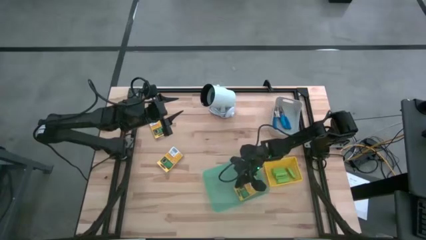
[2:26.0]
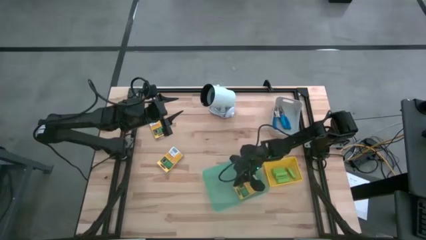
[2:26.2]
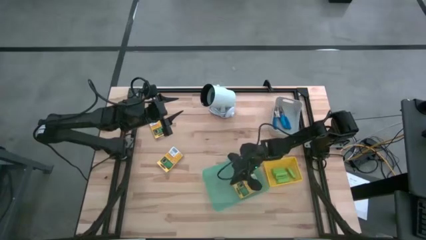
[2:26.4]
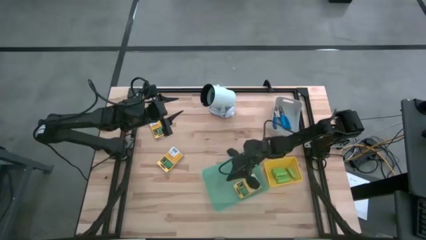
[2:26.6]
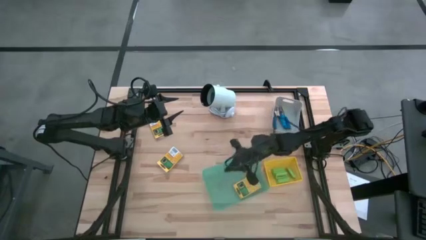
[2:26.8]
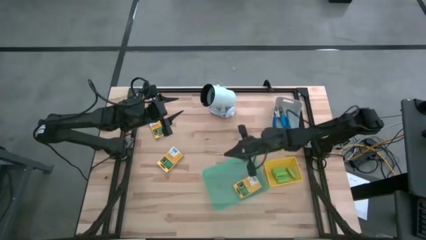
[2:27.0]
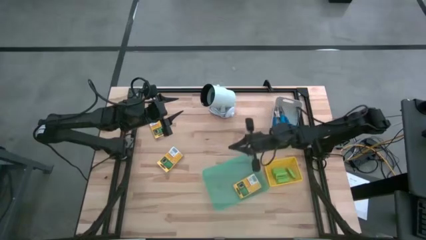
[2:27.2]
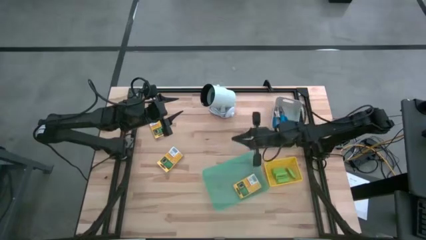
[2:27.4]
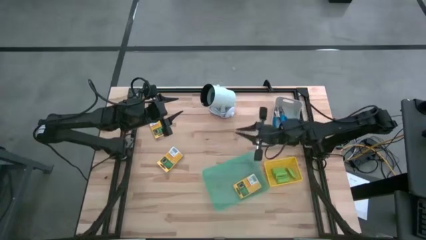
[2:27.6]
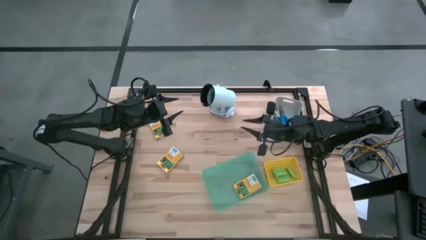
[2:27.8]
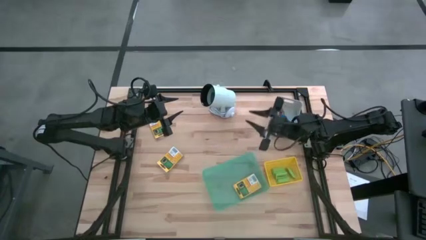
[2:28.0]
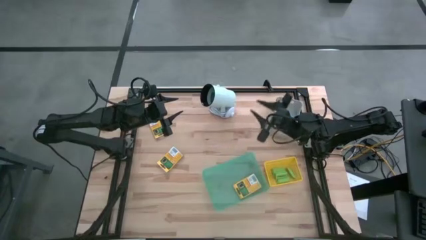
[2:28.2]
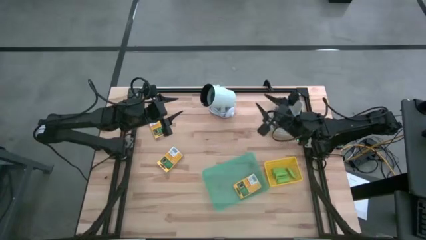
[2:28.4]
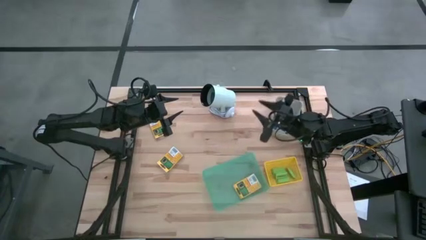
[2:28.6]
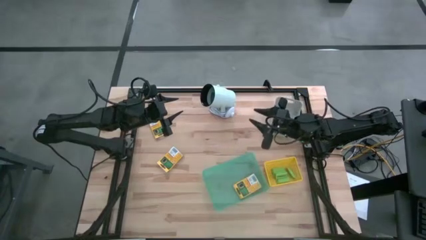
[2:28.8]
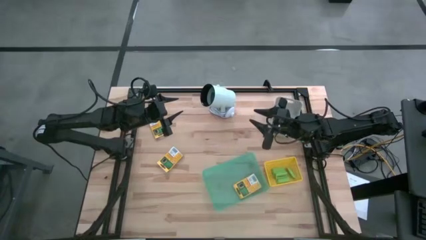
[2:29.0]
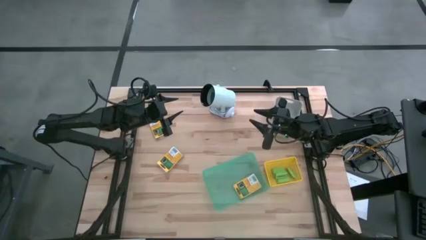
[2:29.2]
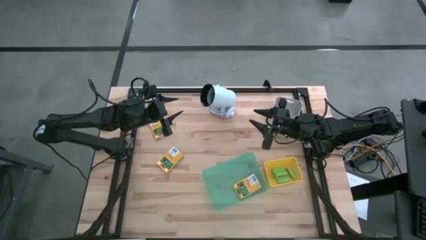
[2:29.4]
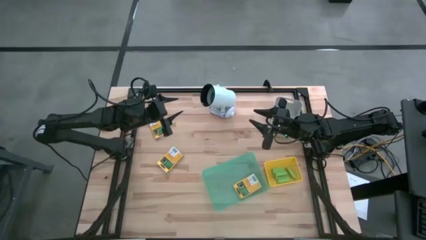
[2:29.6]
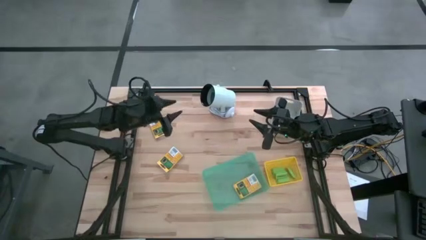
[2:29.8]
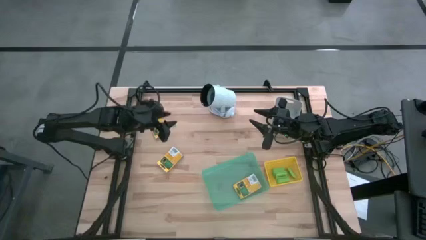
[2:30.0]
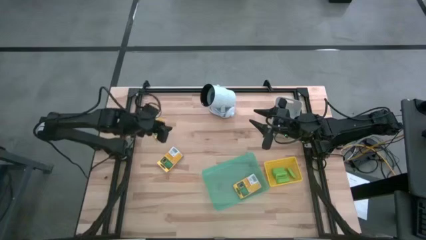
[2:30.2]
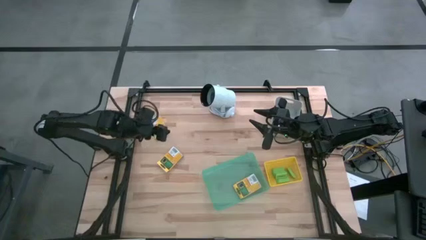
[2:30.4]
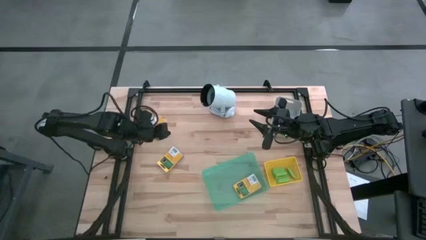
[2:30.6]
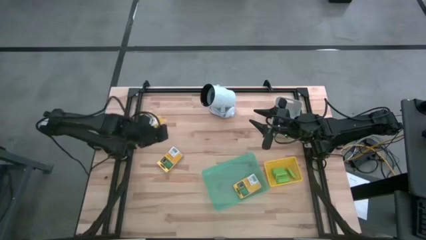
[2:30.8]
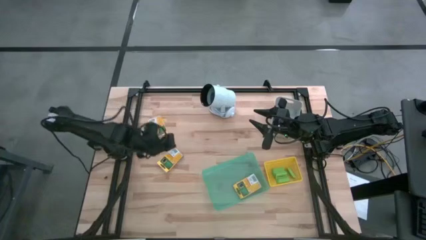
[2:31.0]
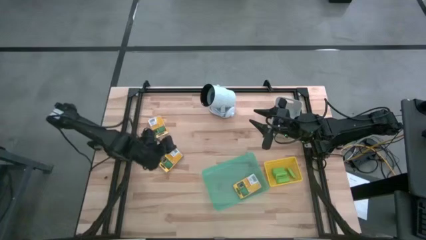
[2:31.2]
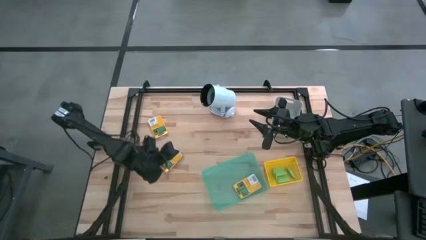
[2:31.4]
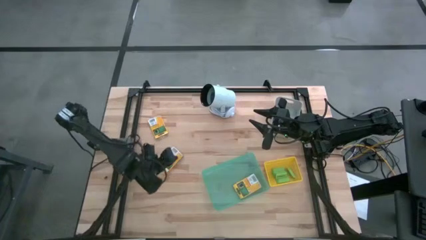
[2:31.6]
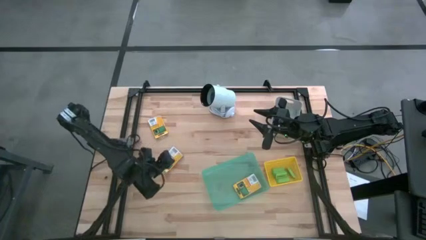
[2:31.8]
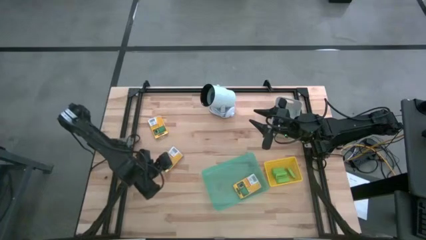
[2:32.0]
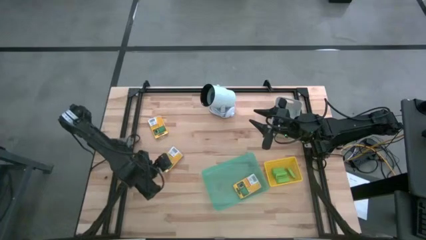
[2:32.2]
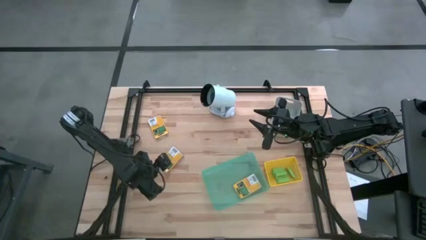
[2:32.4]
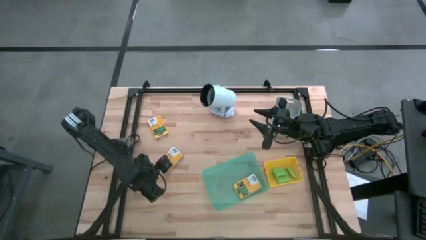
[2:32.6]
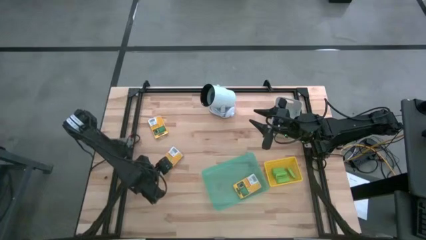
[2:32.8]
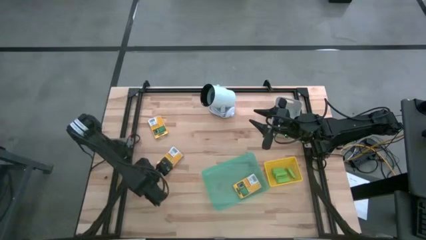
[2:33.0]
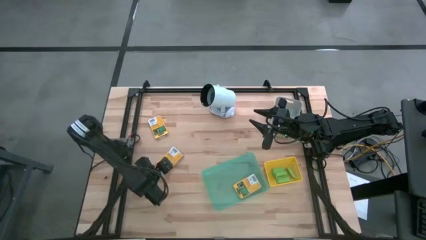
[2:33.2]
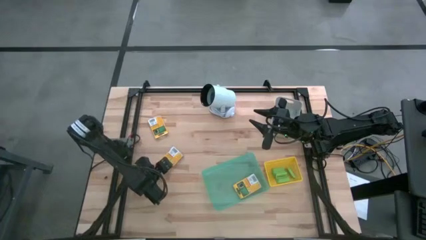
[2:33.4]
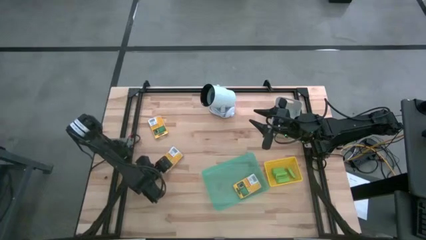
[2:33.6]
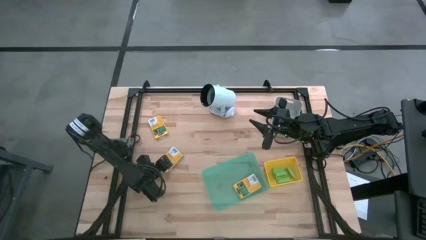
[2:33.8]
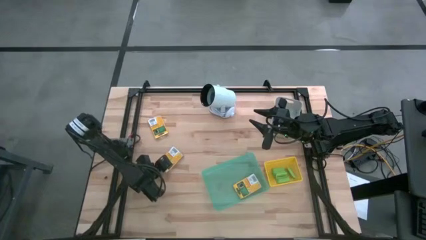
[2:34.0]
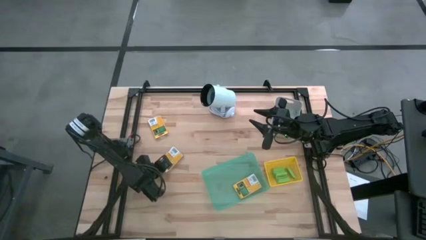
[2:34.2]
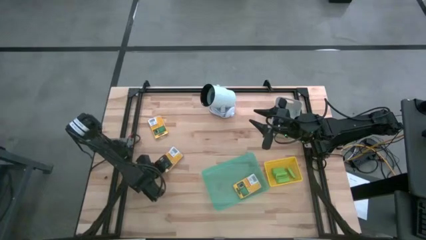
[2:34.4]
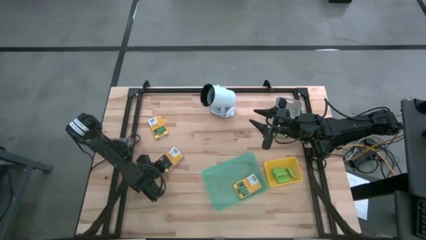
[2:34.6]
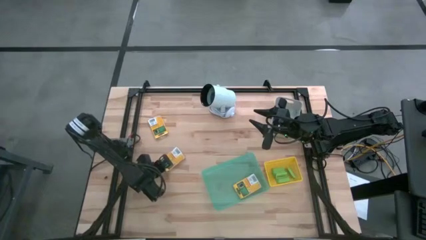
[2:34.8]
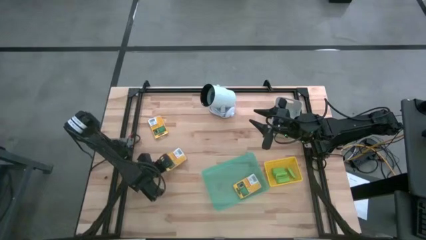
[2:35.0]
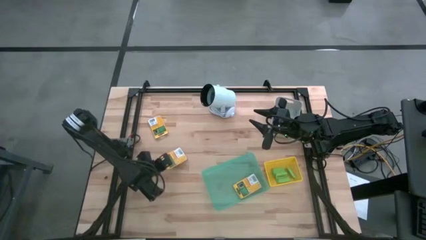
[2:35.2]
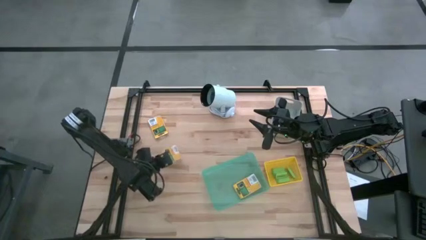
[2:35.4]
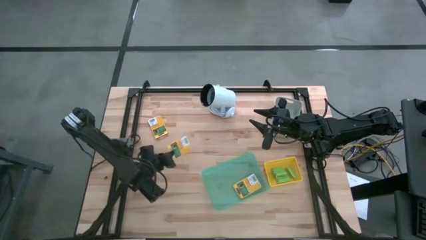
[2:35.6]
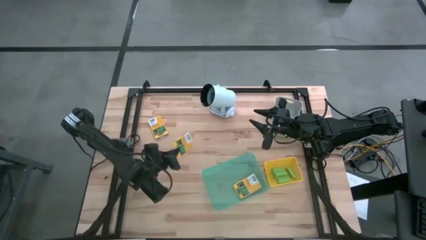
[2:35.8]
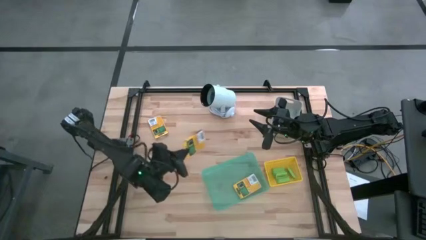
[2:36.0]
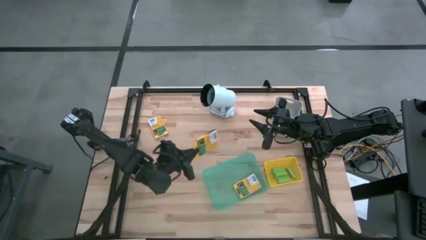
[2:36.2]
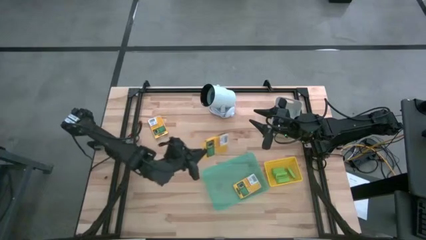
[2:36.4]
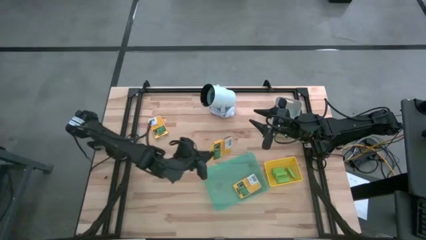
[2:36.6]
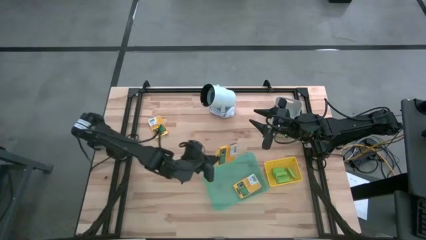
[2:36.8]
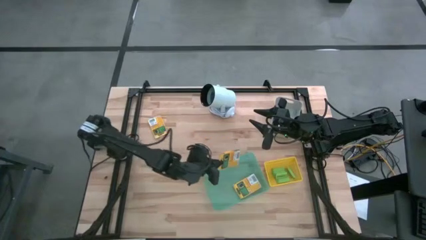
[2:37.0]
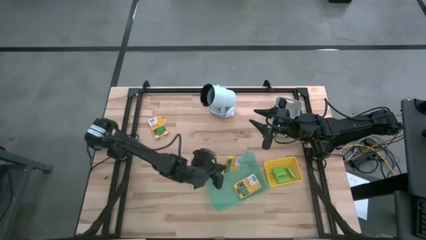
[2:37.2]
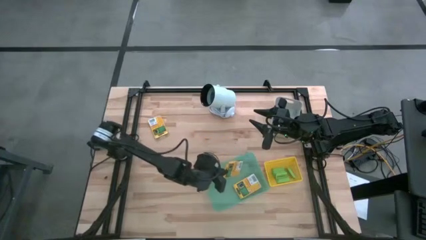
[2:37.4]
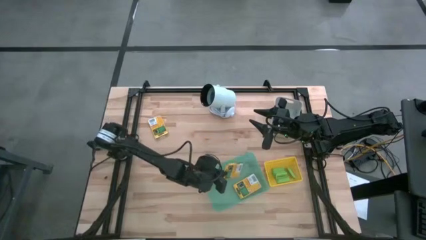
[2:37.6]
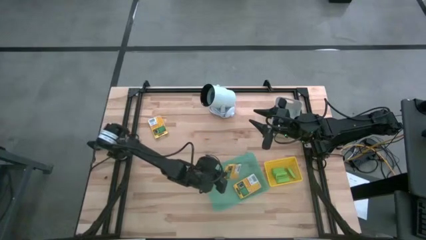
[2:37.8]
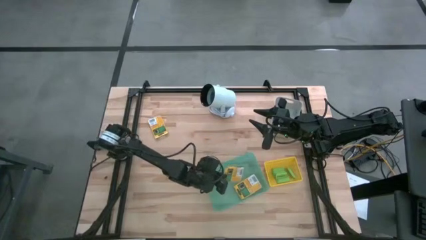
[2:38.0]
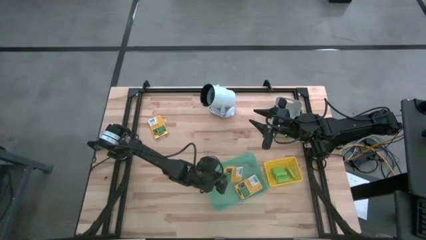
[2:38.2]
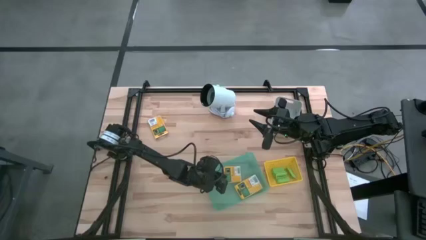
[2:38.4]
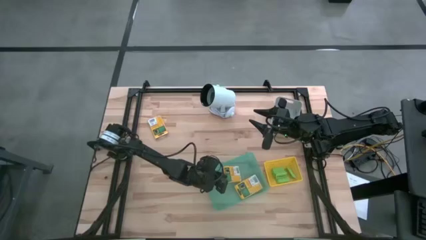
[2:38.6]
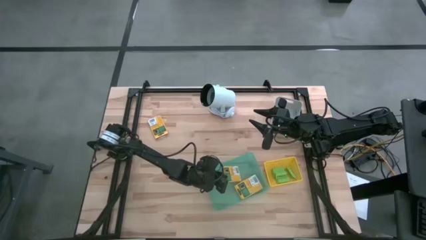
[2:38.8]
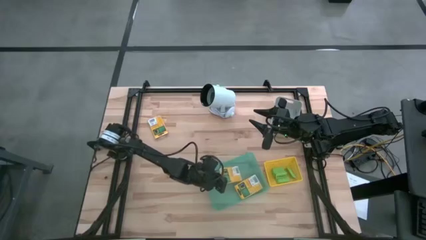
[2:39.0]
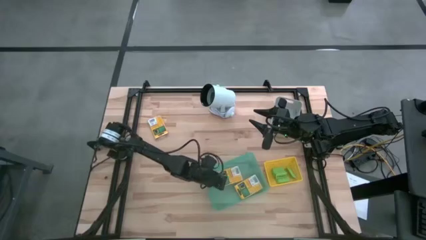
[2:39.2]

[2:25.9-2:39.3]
Task: Pick & Place School Supplies
Put the yellow crayon box into the green bin
